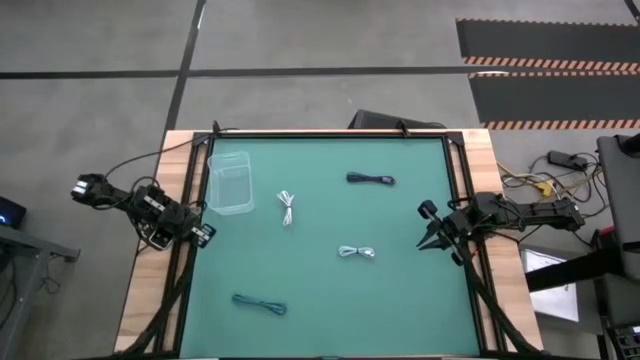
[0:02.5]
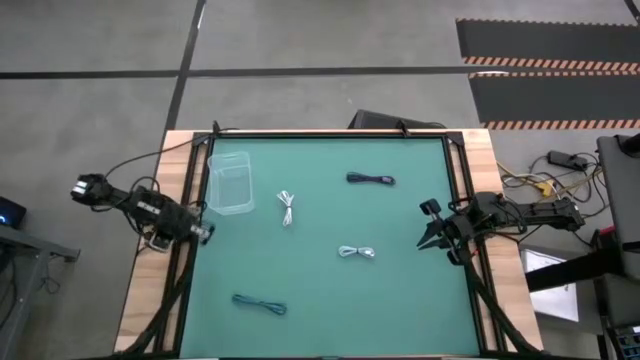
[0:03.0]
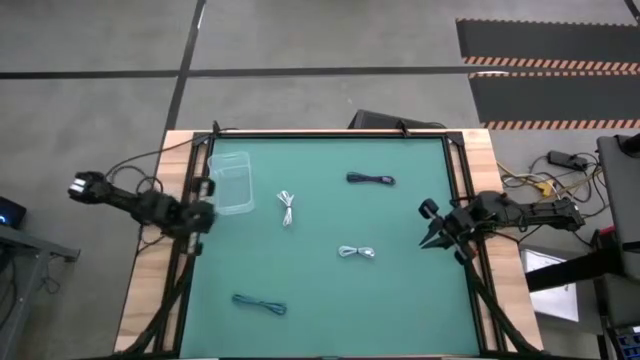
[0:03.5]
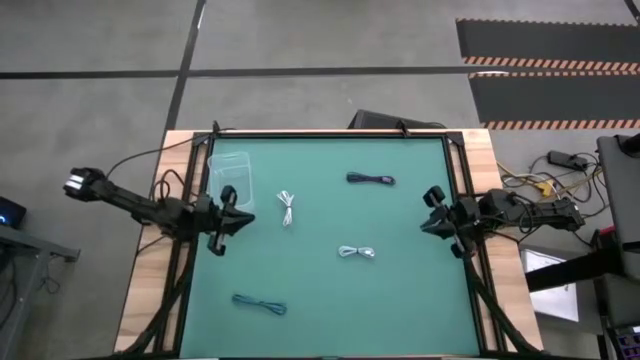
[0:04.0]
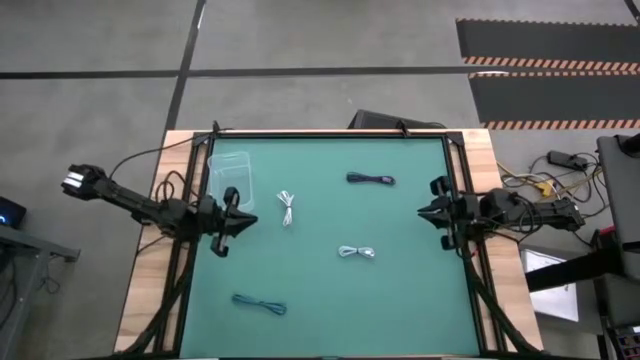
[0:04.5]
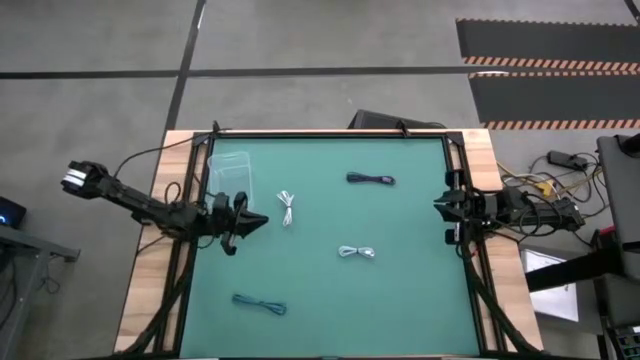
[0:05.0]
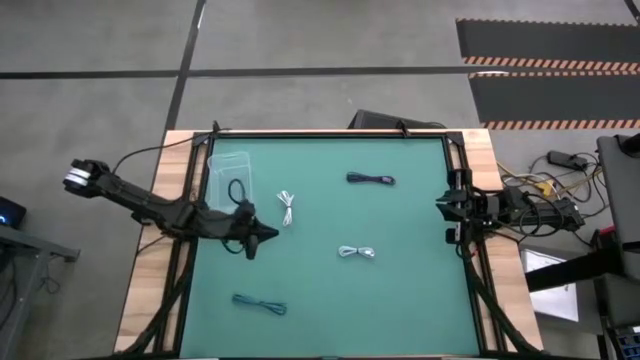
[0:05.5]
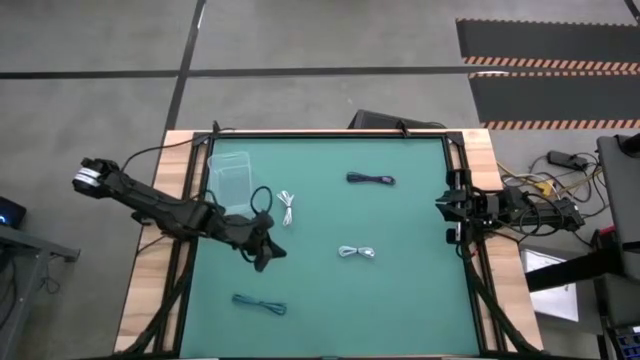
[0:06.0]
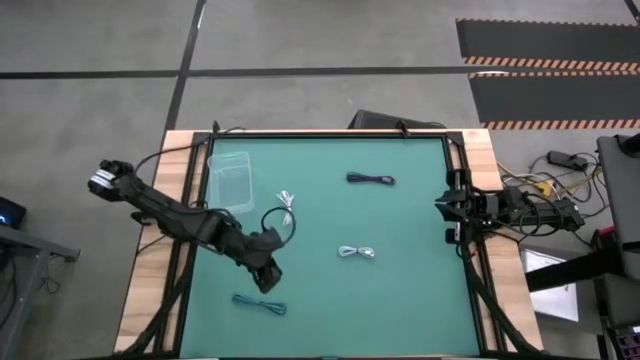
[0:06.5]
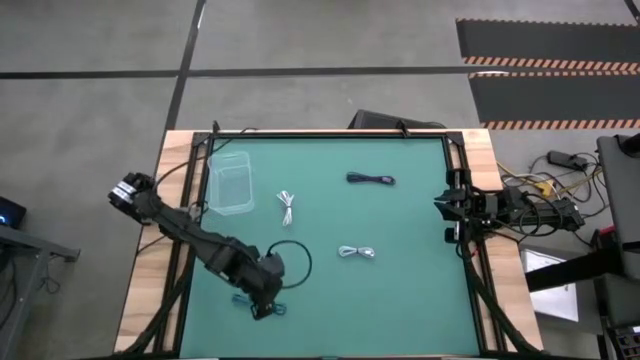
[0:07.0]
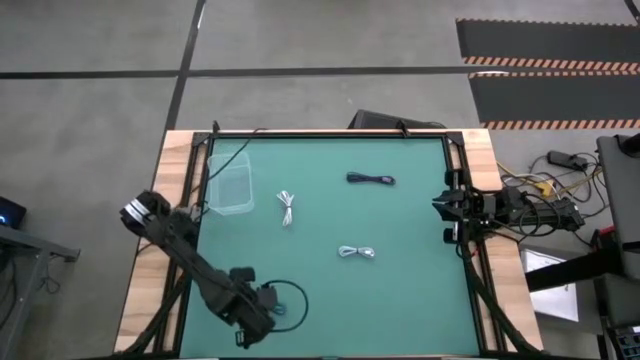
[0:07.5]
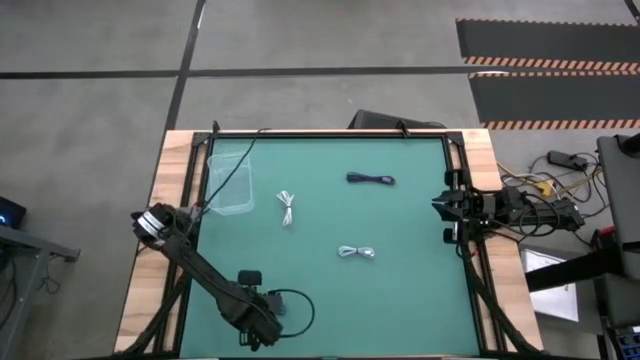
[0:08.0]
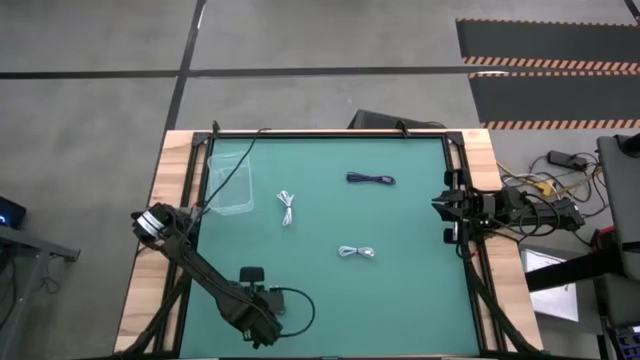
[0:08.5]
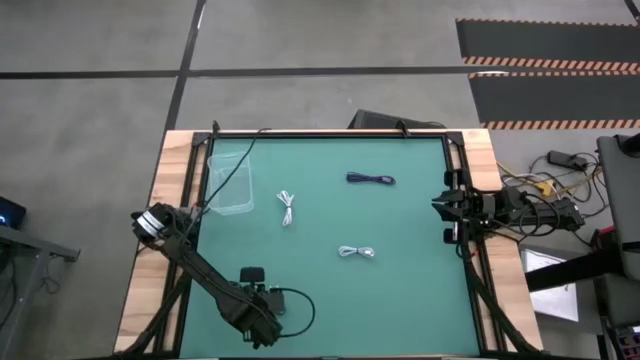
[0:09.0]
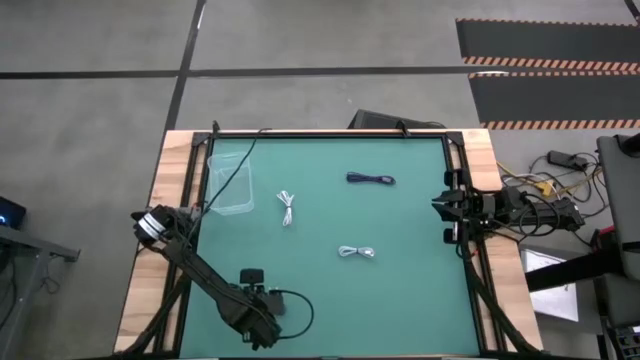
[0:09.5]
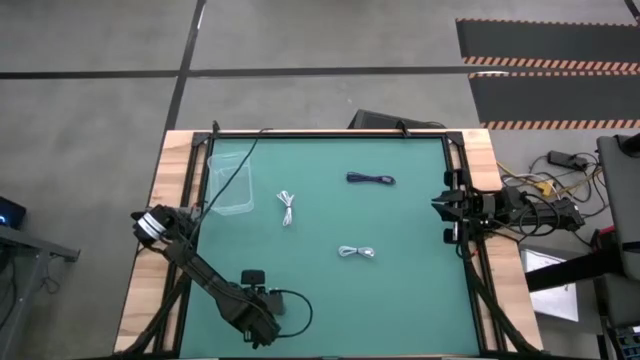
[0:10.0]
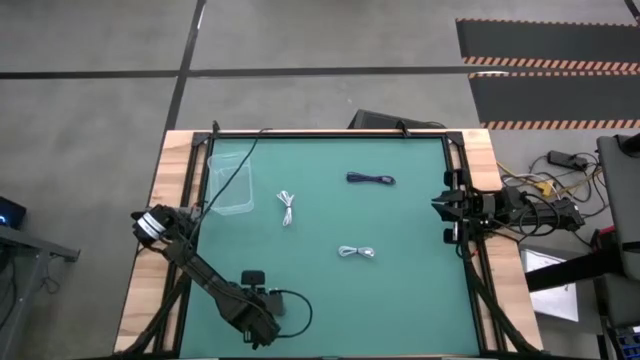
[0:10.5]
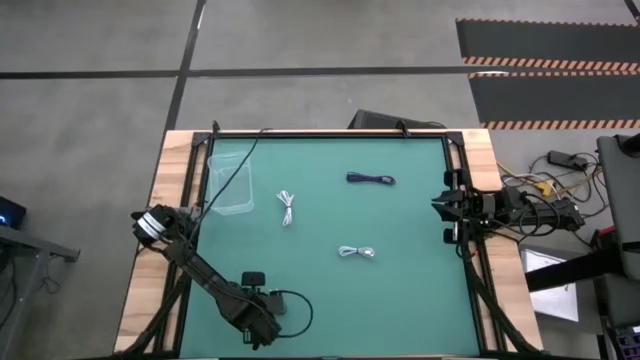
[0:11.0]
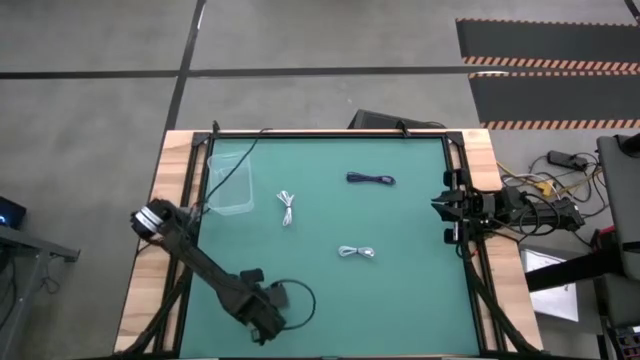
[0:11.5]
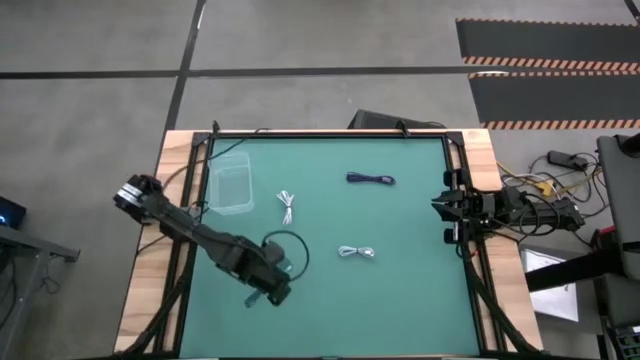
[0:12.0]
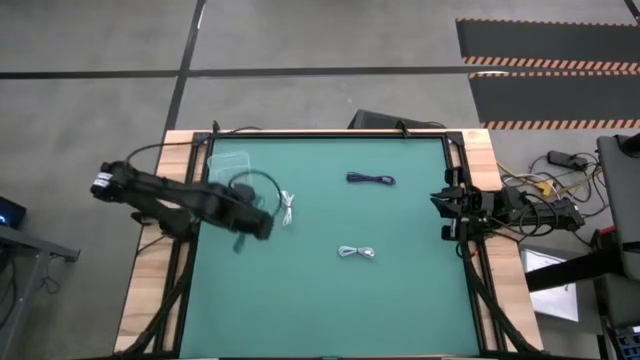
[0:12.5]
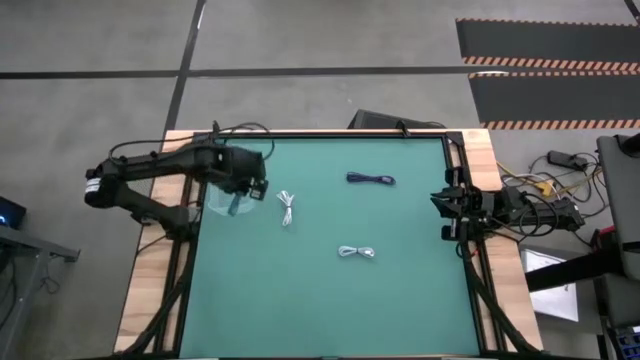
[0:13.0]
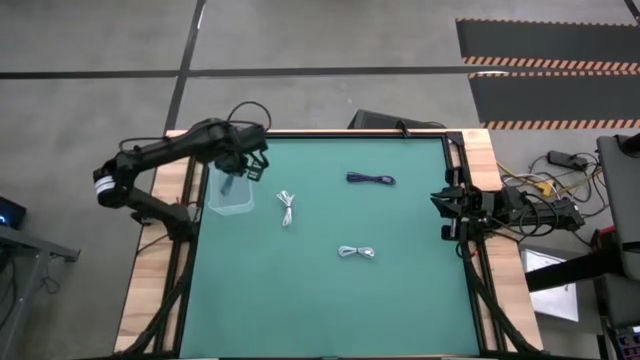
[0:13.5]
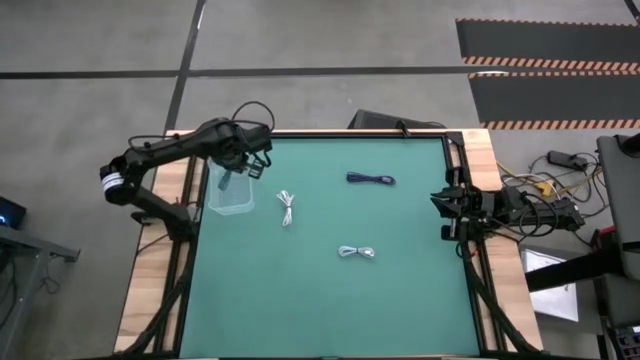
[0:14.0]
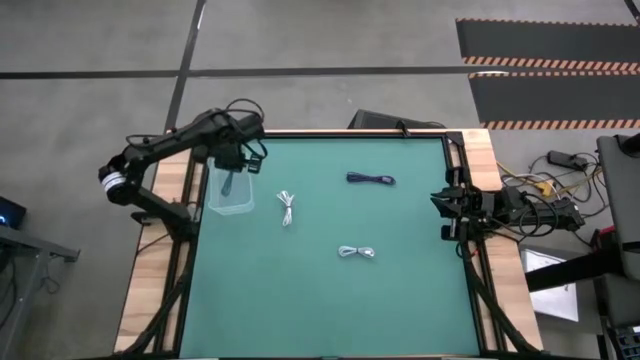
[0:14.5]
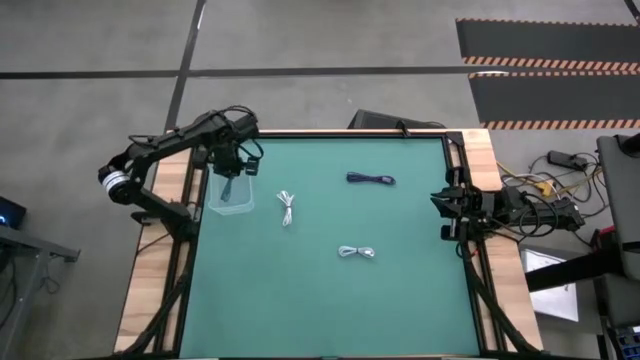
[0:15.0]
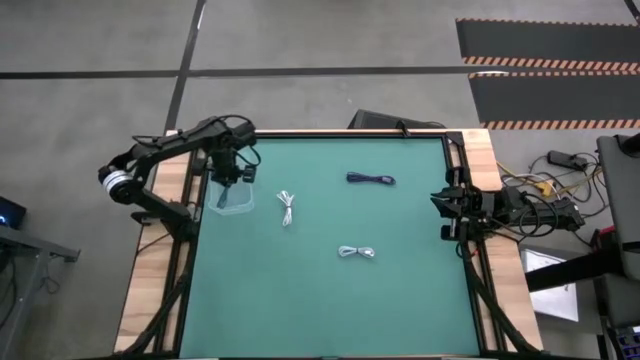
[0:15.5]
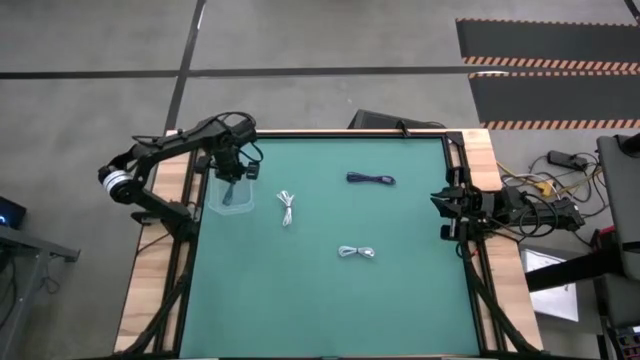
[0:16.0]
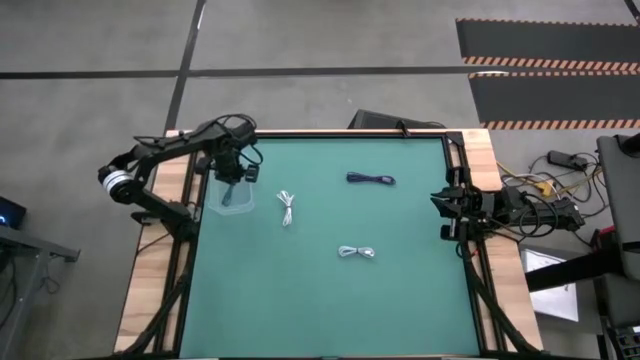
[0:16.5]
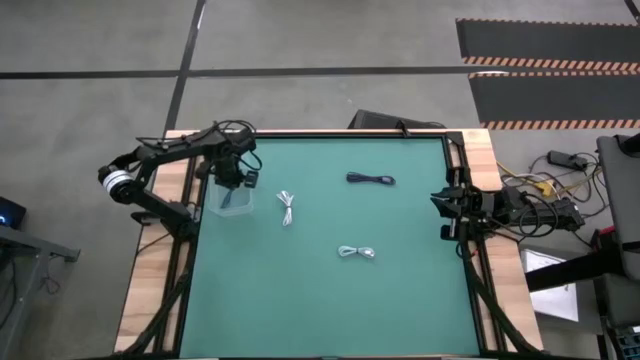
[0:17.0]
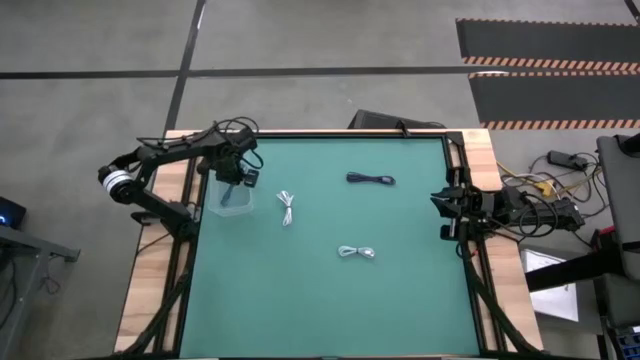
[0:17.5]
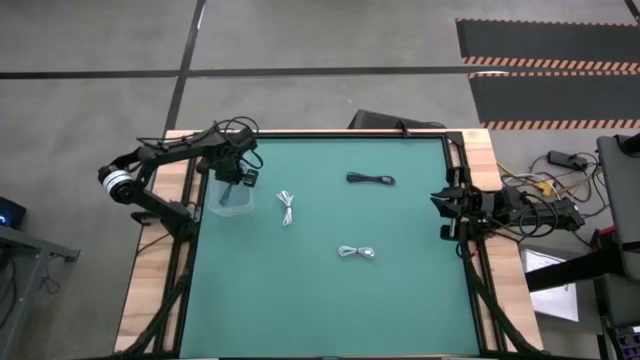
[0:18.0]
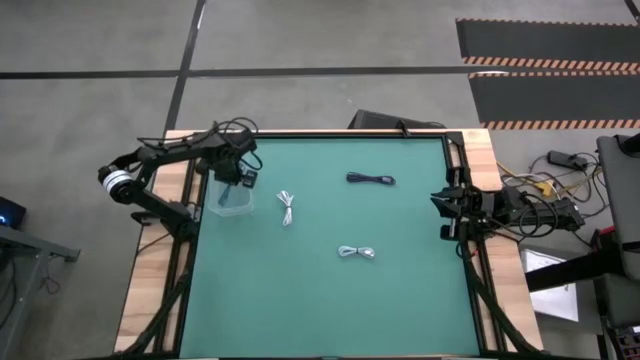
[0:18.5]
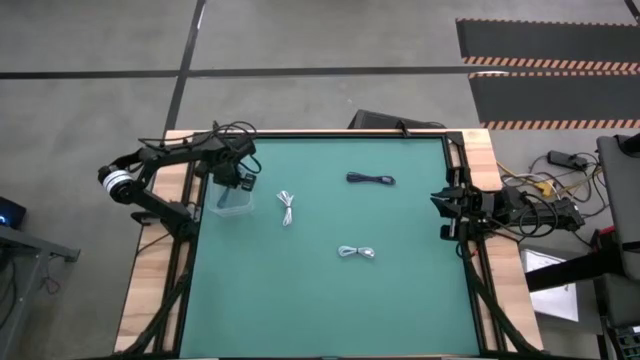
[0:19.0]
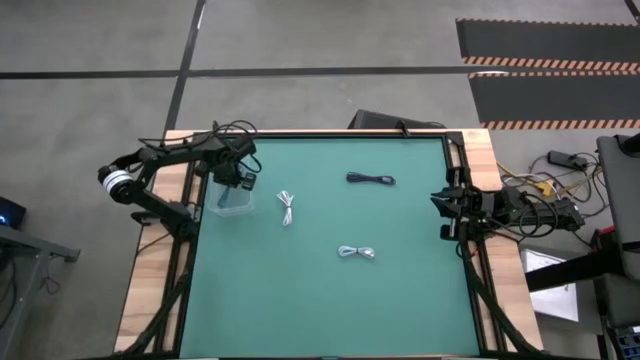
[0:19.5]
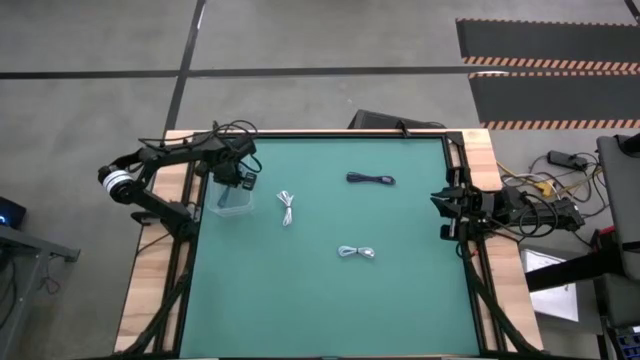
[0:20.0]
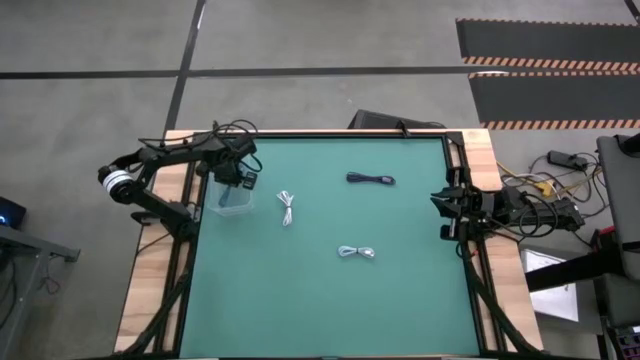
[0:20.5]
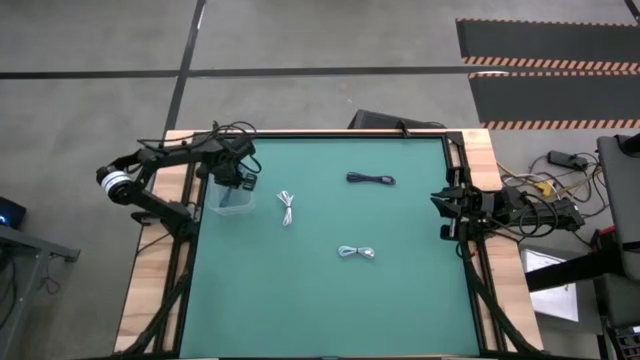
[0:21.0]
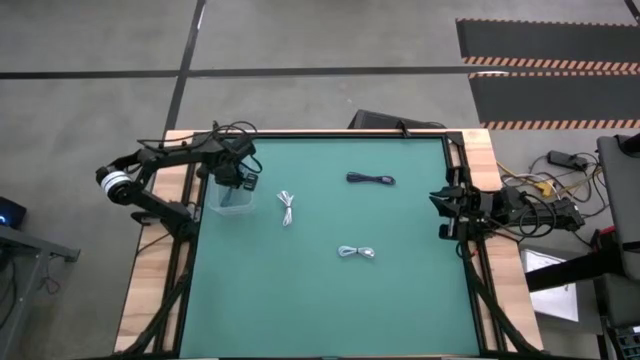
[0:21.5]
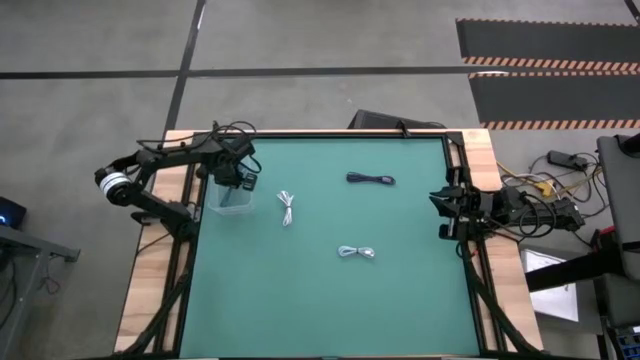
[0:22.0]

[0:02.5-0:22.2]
Task: Pick and place USB-C Cables
Put the blue charger cable into the transparent bin
